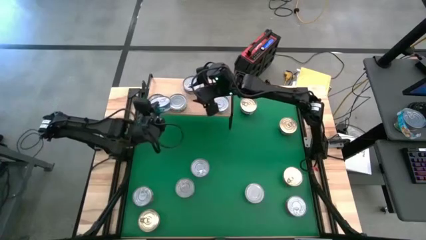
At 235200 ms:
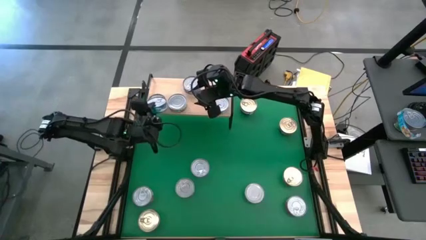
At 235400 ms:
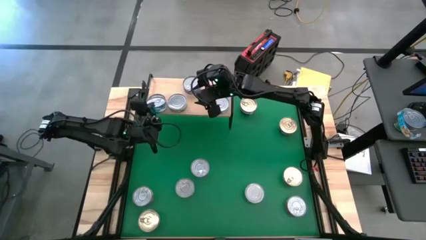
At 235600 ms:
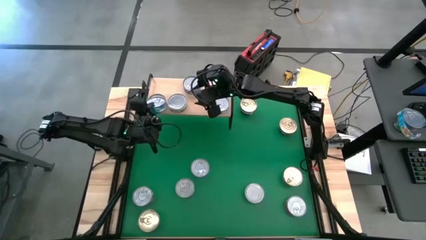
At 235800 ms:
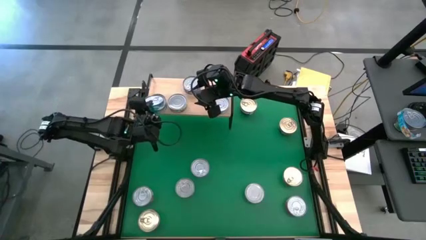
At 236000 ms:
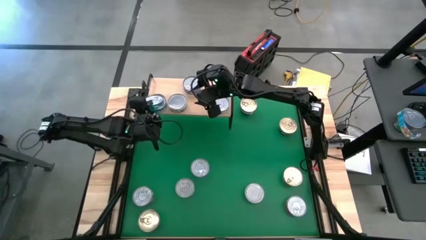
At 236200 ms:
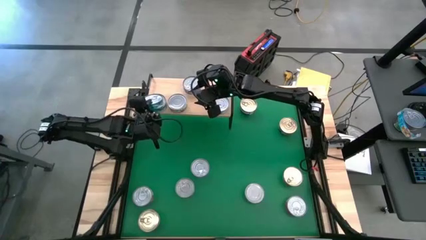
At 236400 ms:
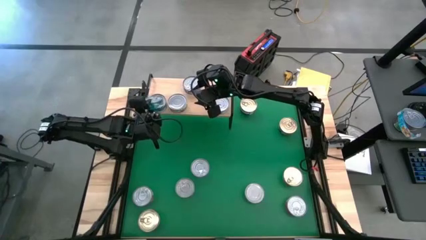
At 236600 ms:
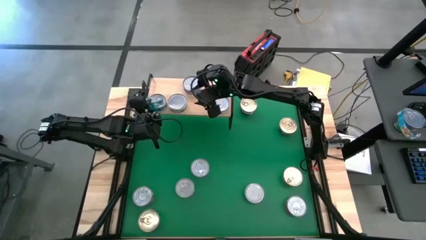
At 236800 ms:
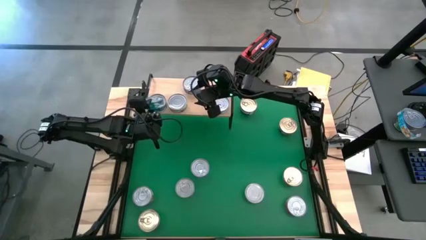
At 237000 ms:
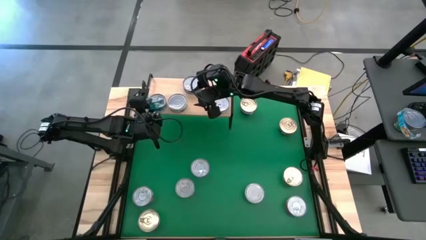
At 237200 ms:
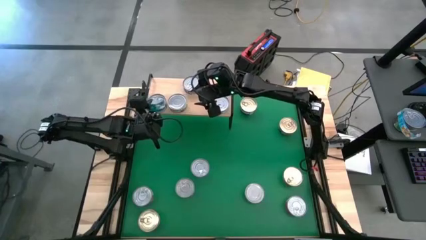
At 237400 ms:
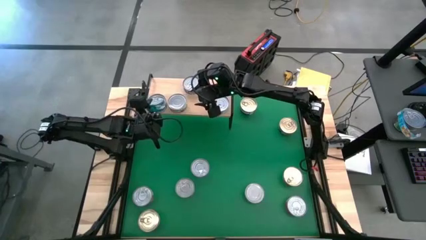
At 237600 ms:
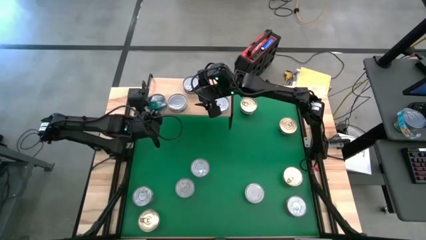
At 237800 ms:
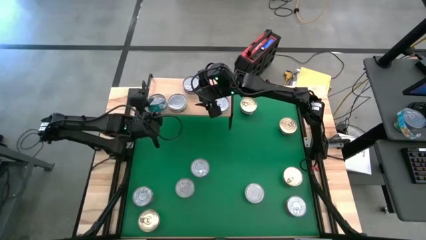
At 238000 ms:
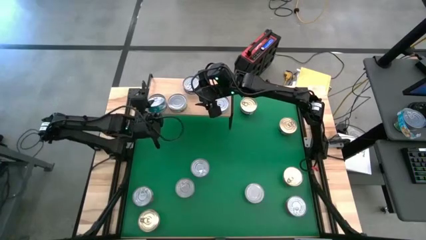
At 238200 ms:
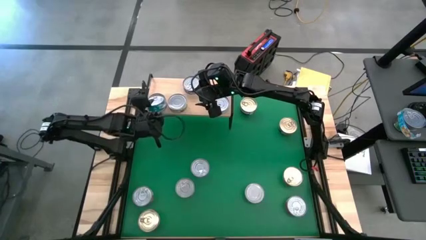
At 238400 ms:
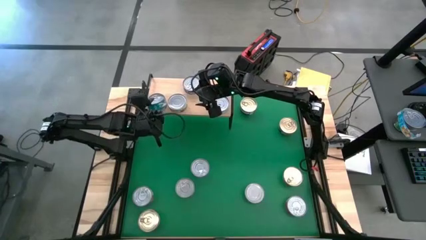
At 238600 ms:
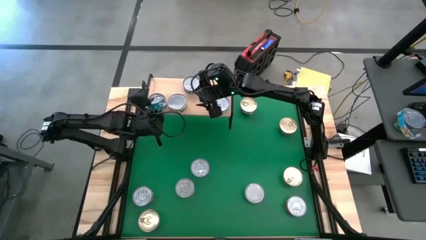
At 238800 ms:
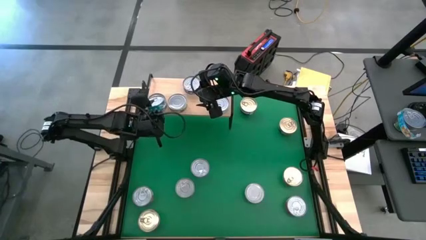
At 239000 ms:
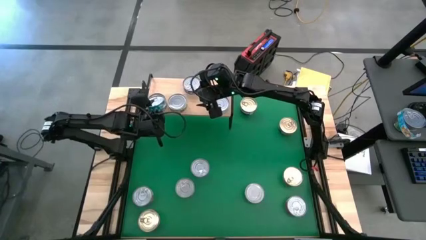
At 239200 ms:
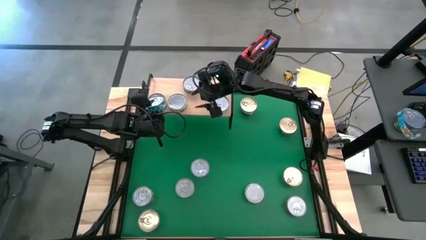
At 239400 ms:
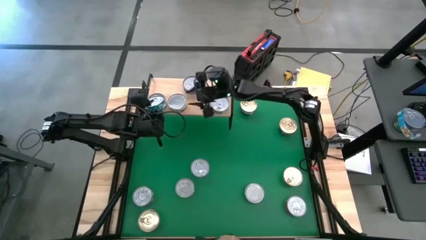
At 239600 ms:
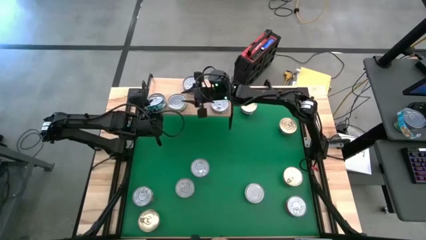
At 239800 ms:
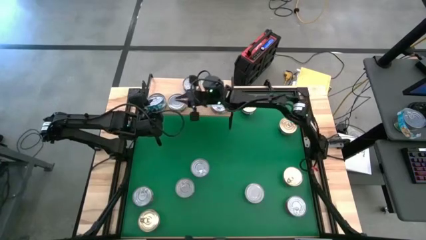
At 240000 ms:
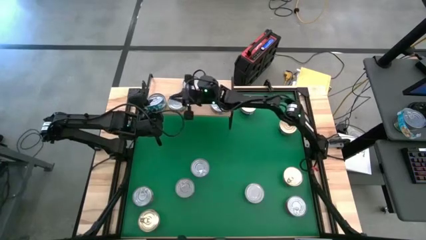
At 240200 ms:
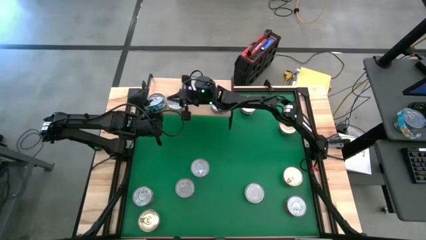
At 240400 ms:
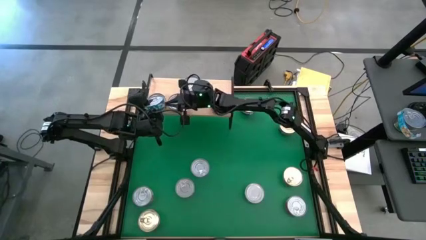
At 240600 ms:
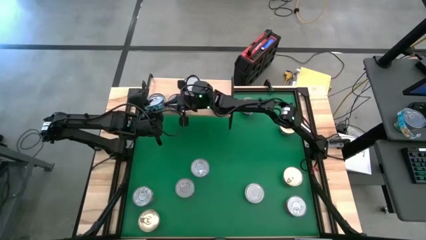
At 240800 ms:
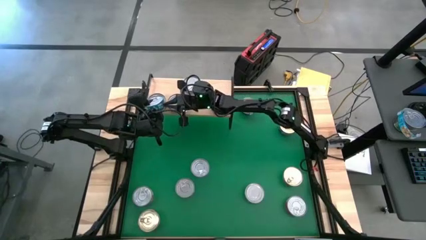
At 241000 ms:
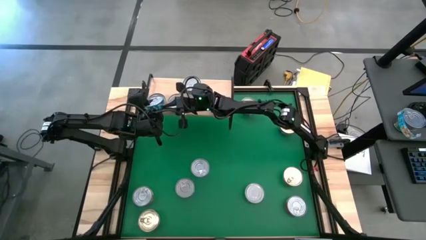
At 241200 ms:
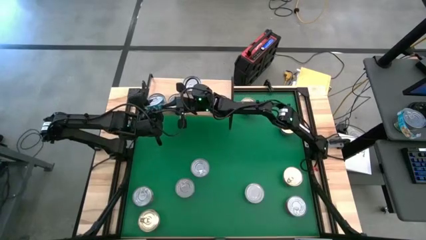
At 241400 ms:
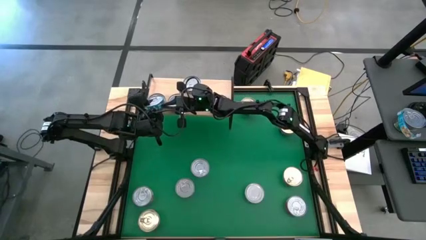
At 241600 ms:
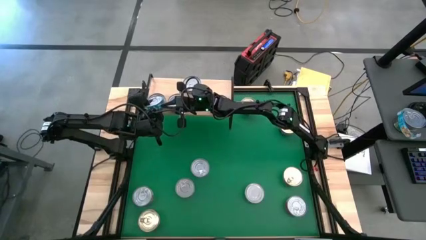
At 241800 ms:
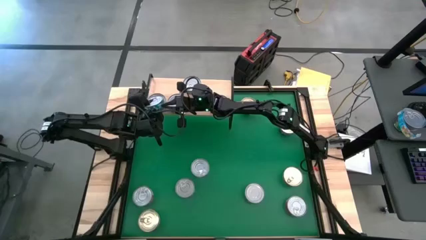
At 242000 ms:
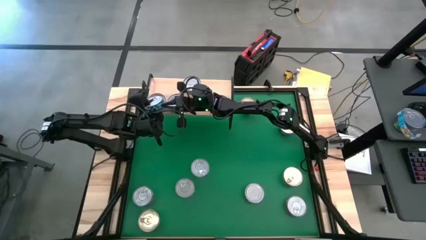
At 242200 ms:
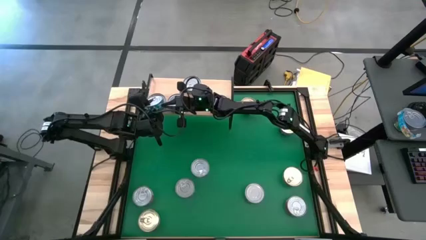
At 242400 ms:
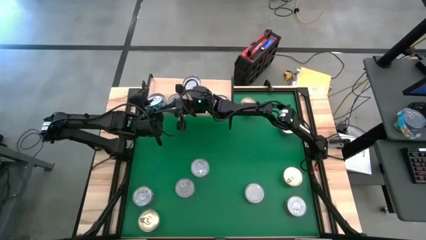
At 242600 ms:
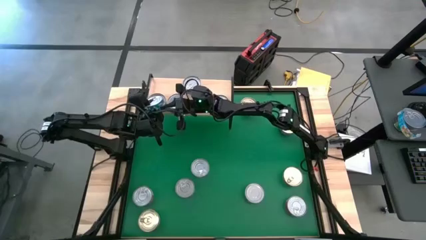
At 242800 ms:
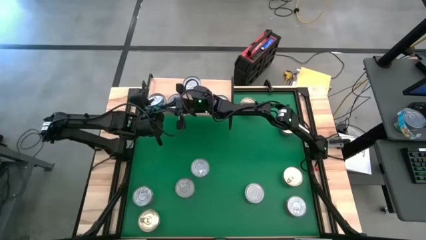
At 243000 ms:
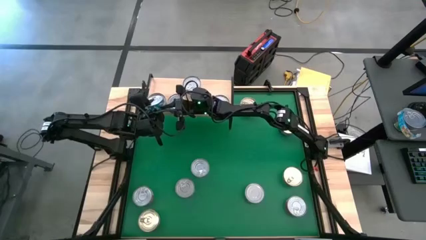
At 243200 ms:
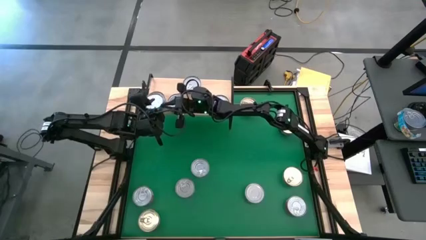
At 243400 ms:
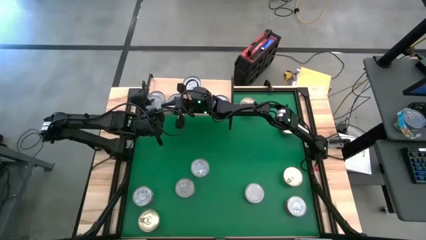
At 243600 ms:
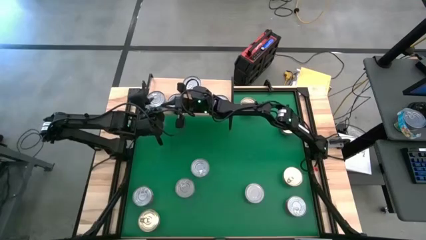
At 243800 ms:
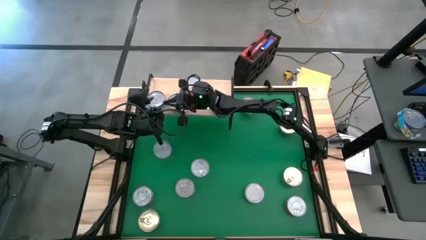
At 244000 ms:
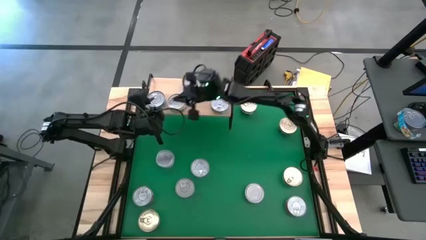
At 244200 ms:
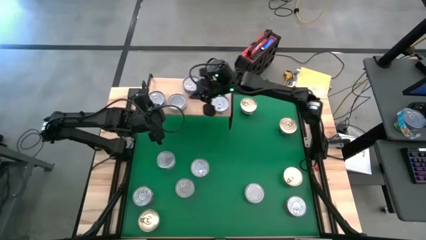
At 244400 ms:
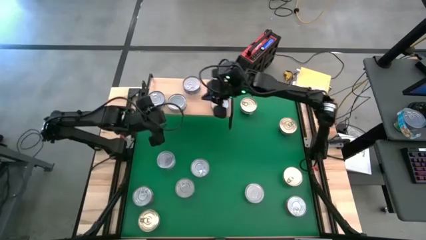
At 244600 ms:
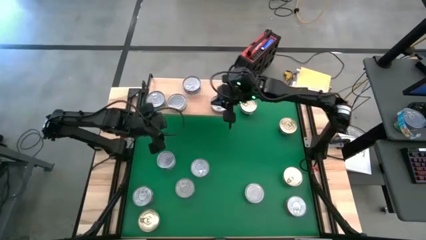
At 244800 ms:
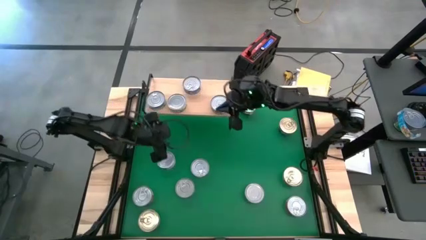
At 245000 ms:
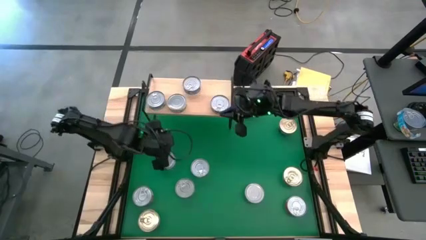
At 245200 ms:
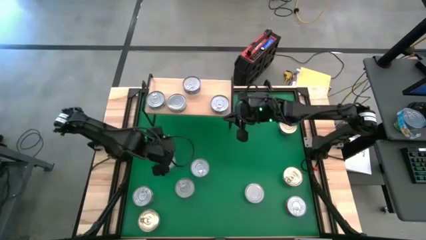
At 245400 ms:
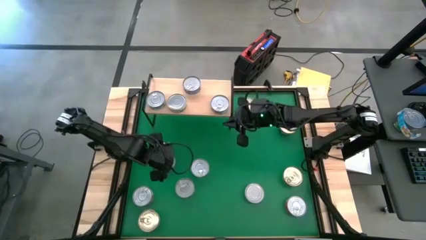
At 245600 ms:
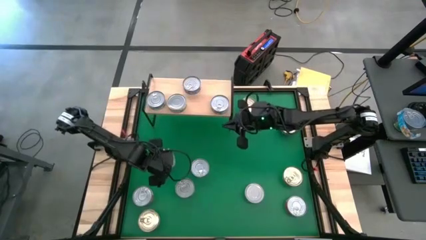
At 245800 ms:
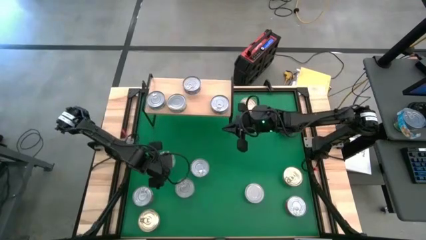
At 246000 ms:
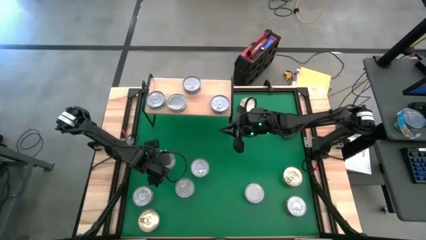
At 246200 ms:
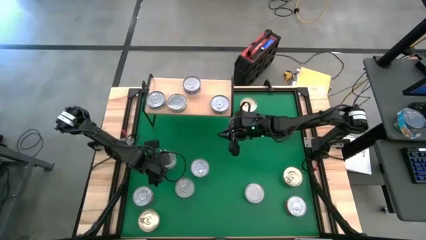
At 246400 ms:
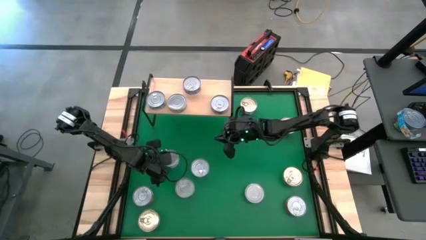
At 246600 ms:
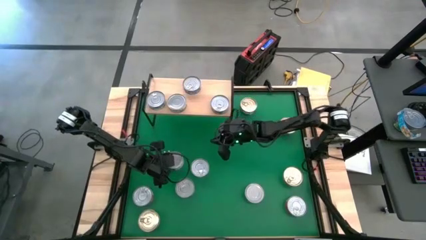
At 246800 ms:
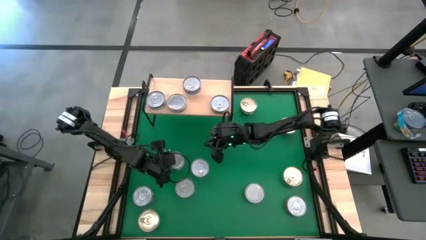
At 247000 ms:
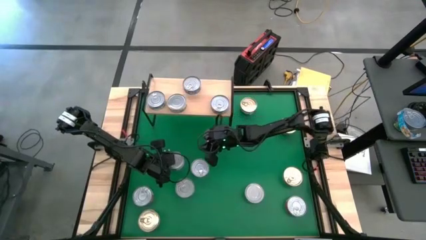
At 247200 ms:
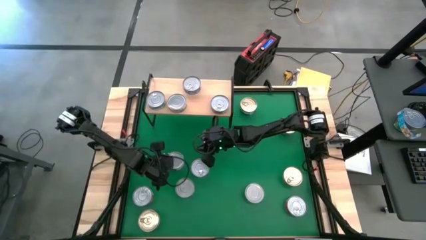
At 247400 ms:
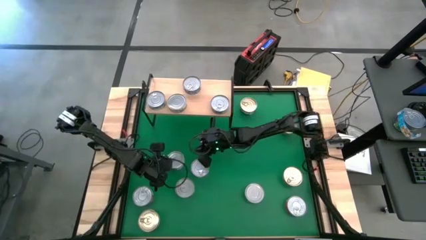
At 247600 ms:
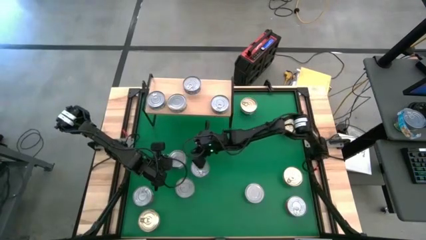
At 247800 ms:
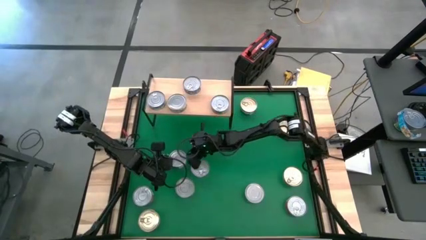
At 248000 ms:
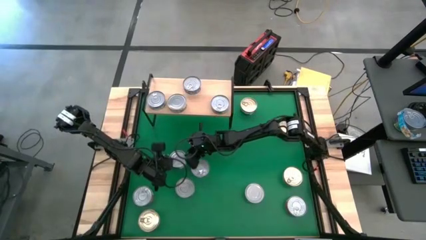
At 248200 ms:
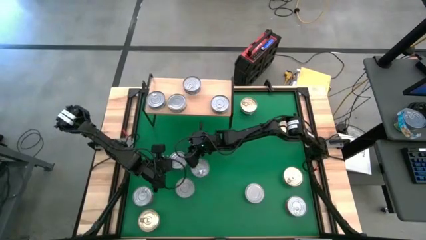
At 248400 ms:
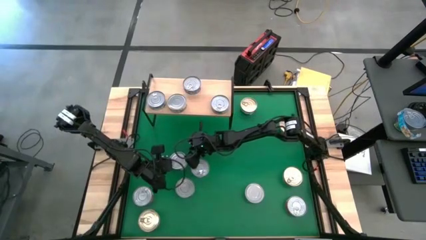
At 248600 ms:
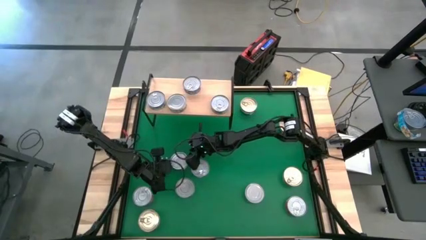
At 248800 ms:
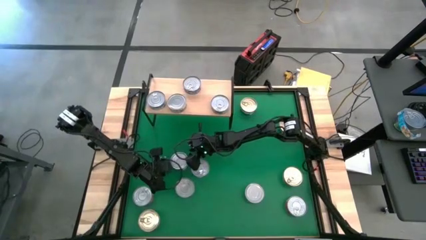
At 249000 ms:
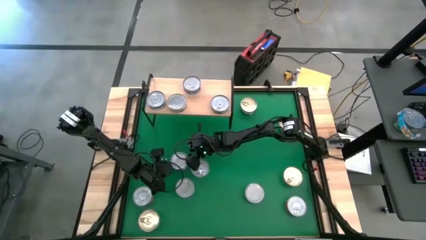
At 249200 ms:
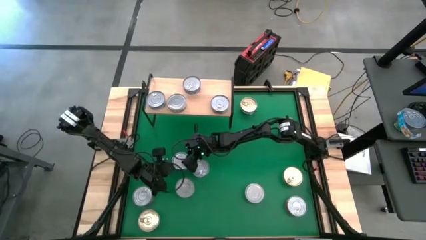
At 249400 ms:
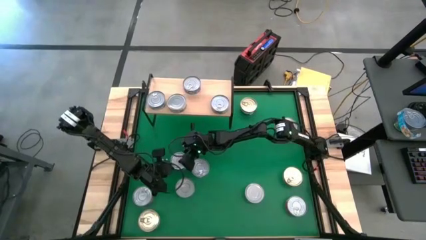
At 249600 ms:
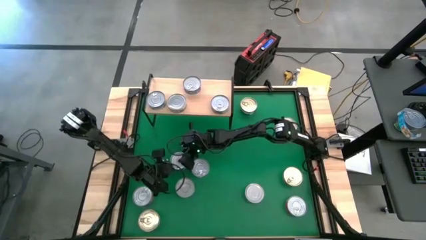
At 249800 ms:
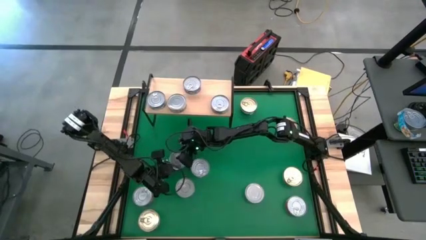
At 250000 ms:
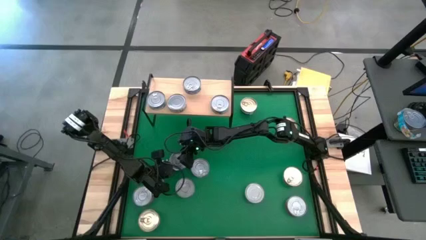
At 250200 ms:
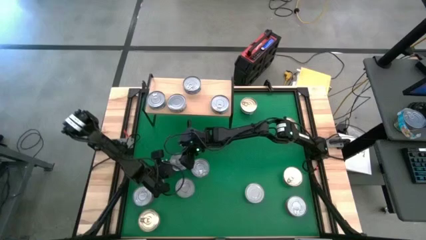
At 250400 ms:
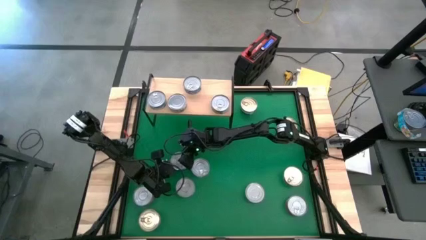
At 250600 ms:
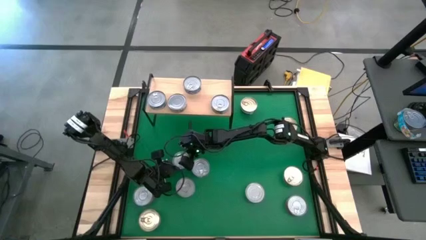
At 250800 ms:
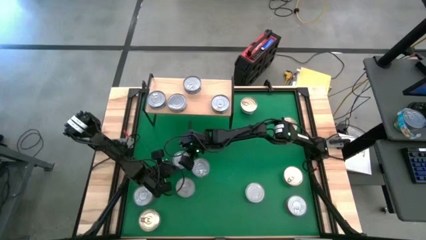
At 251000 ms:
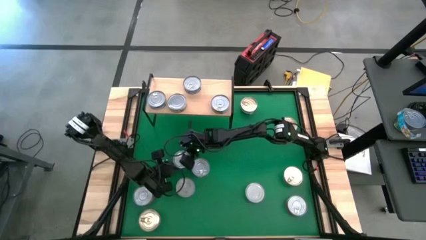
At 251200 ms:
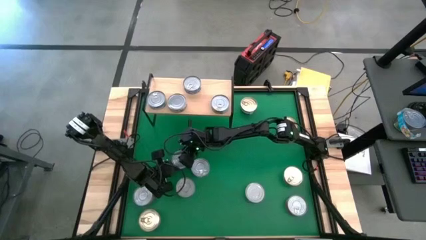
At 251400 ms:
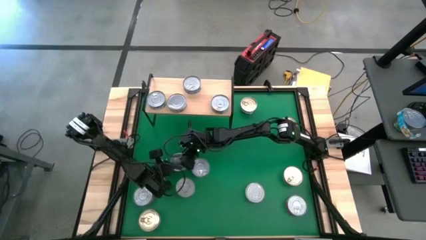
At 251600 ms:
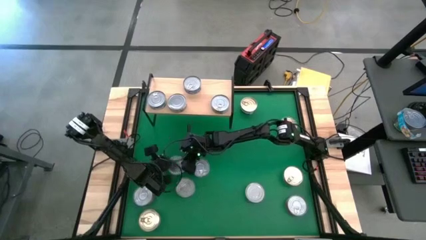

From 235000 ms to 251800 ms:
Task: Stack canned seafood by type on shelf
Stack the center light blue tuna can on top of the light blue tuna can on the shelf
